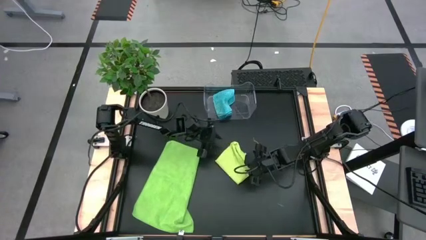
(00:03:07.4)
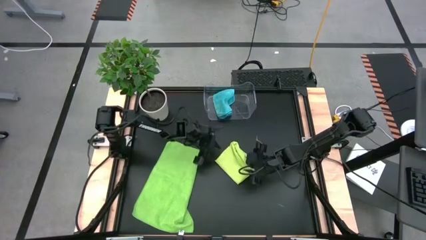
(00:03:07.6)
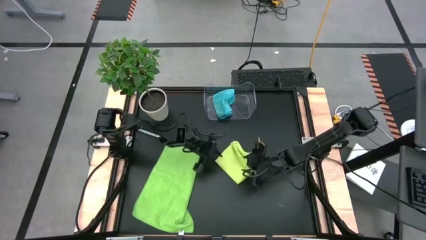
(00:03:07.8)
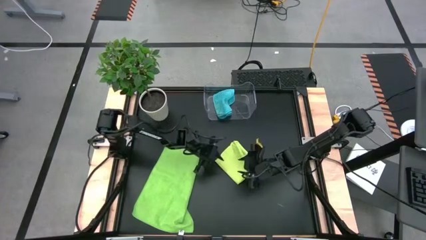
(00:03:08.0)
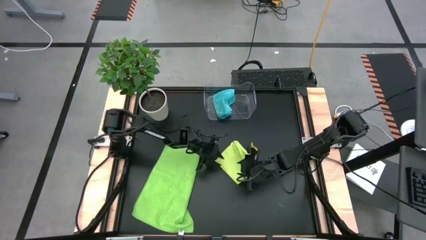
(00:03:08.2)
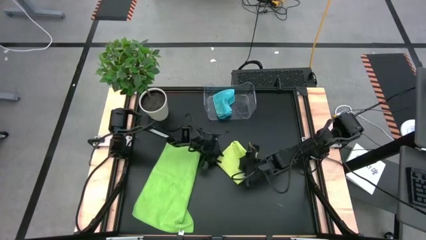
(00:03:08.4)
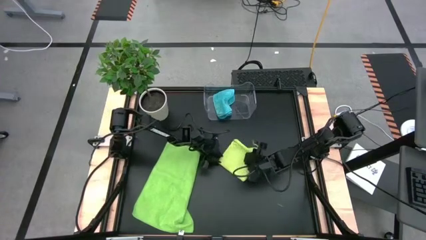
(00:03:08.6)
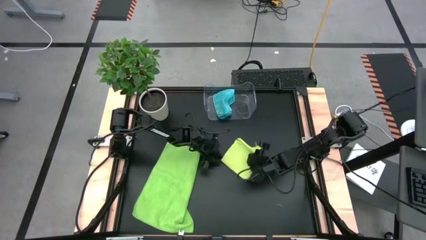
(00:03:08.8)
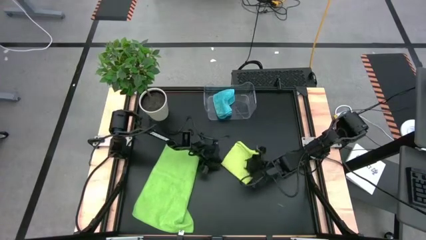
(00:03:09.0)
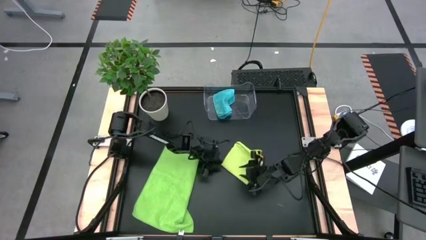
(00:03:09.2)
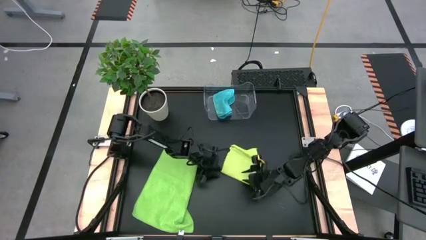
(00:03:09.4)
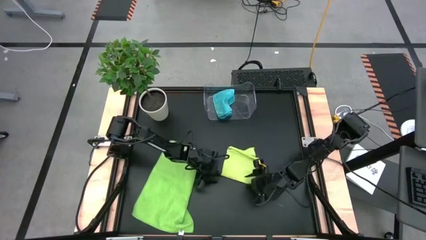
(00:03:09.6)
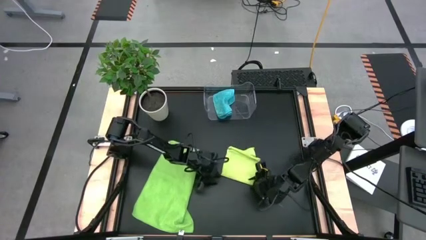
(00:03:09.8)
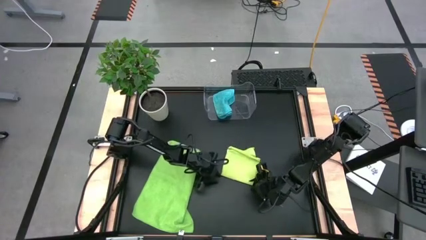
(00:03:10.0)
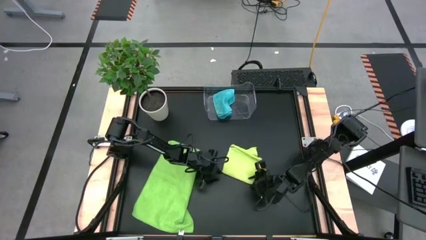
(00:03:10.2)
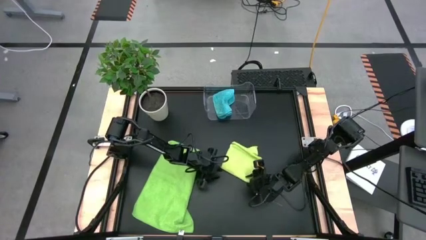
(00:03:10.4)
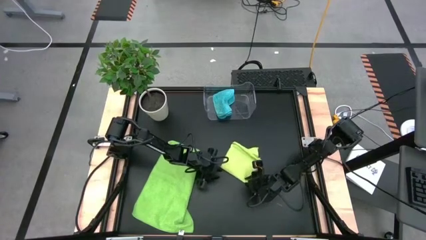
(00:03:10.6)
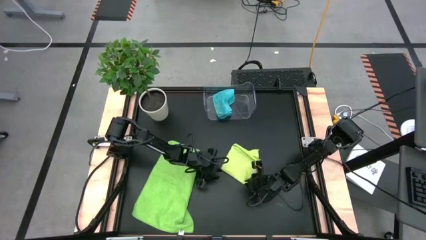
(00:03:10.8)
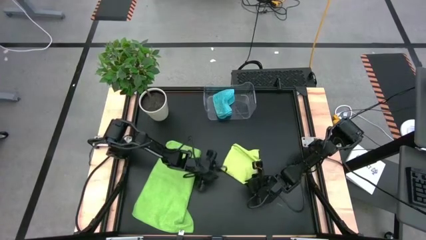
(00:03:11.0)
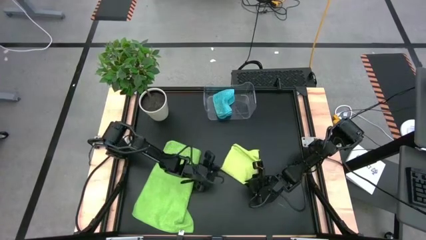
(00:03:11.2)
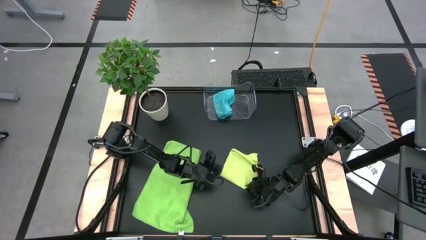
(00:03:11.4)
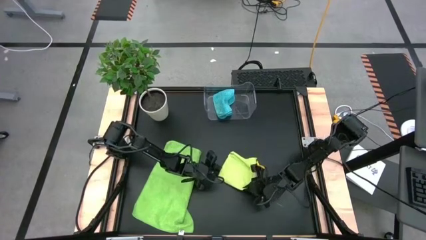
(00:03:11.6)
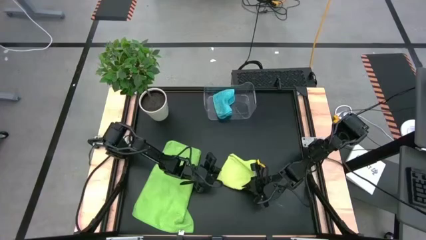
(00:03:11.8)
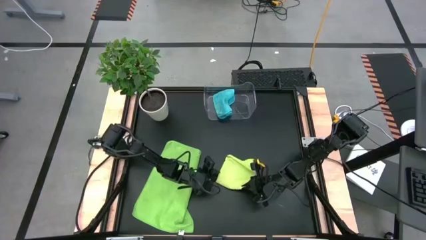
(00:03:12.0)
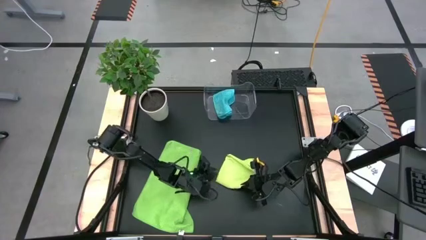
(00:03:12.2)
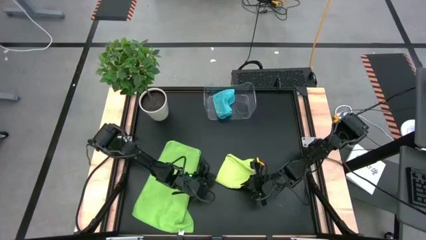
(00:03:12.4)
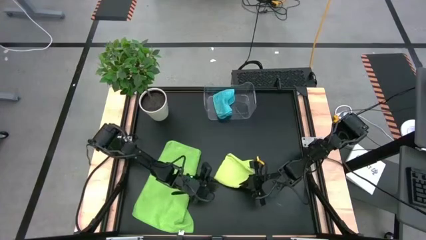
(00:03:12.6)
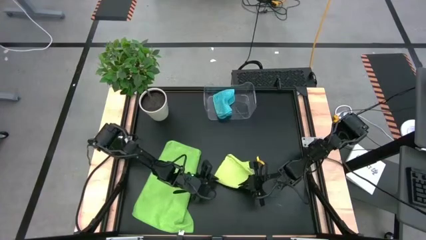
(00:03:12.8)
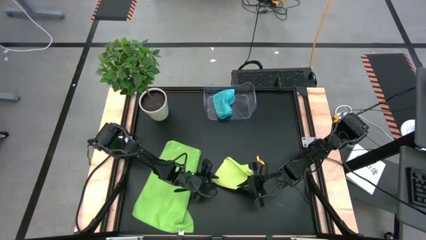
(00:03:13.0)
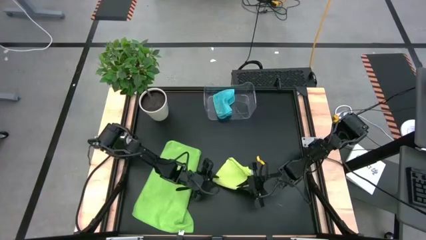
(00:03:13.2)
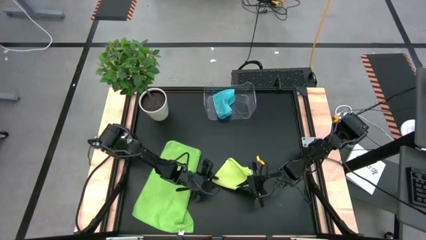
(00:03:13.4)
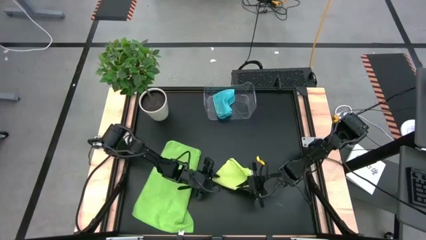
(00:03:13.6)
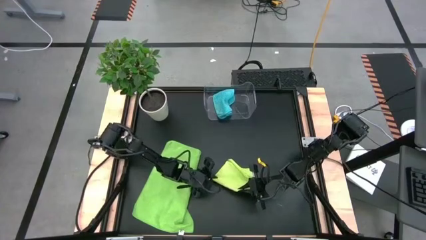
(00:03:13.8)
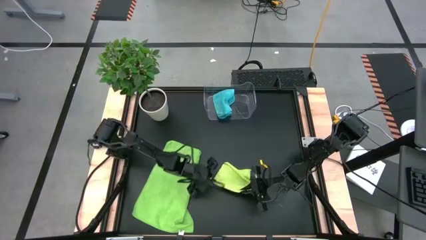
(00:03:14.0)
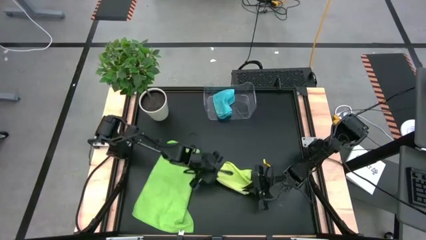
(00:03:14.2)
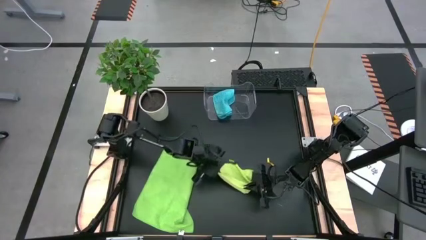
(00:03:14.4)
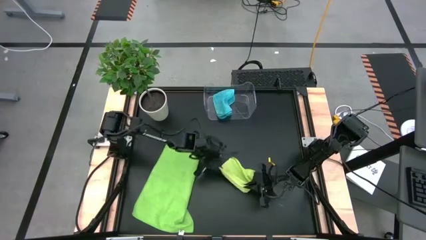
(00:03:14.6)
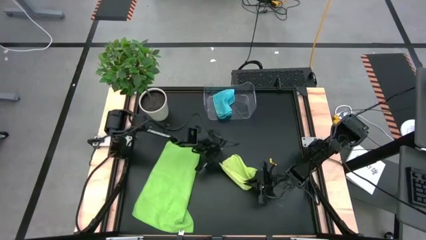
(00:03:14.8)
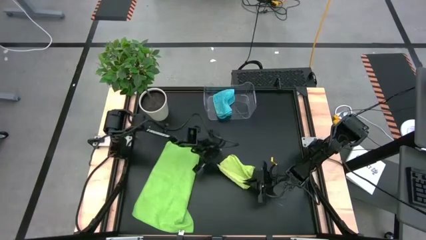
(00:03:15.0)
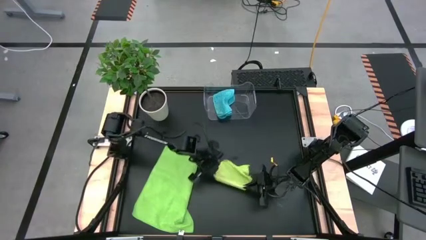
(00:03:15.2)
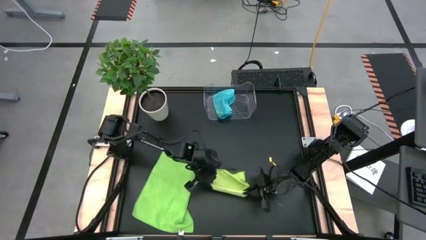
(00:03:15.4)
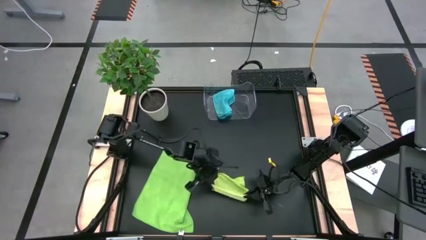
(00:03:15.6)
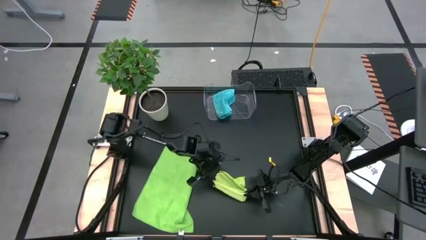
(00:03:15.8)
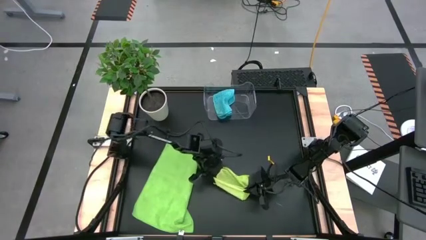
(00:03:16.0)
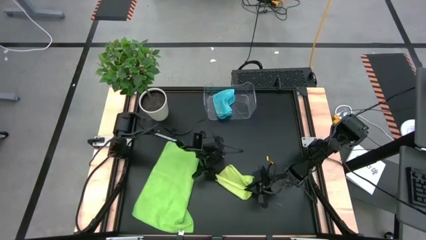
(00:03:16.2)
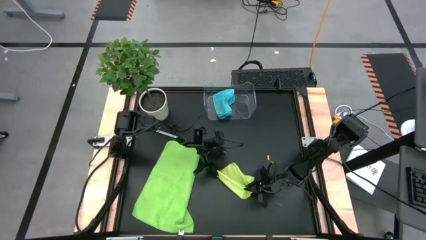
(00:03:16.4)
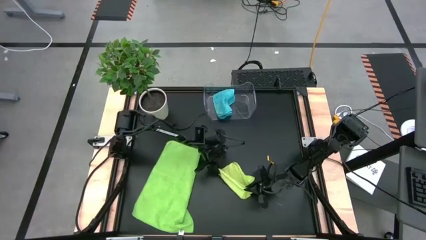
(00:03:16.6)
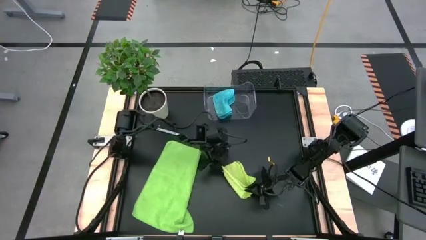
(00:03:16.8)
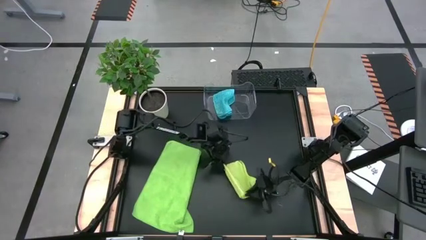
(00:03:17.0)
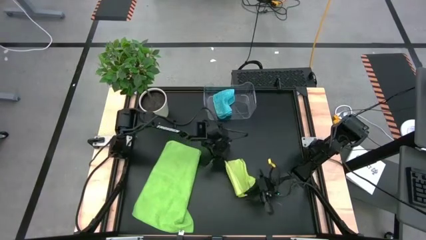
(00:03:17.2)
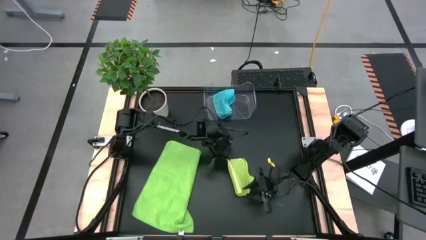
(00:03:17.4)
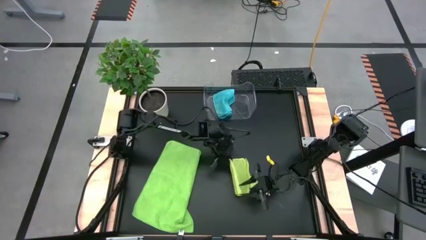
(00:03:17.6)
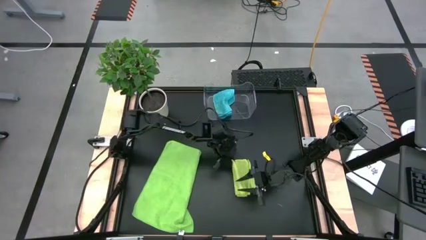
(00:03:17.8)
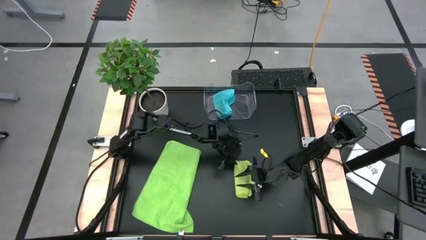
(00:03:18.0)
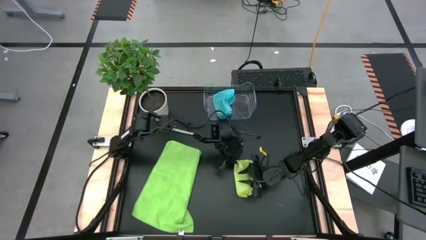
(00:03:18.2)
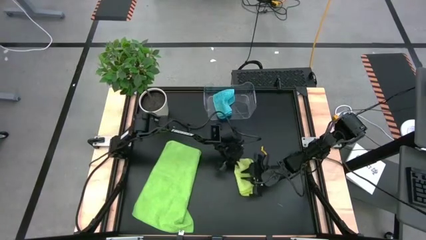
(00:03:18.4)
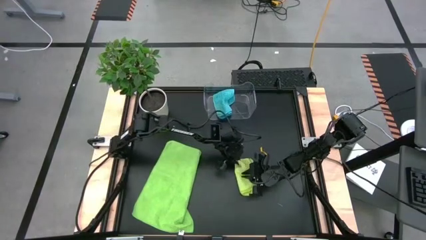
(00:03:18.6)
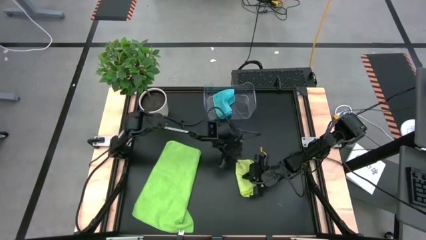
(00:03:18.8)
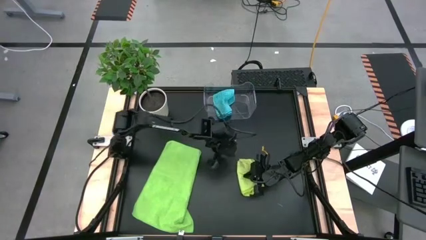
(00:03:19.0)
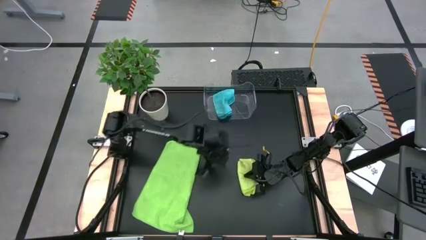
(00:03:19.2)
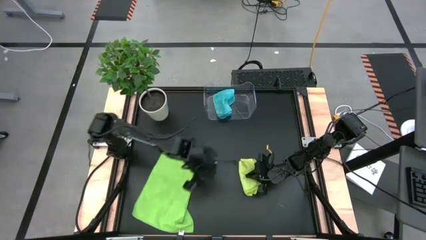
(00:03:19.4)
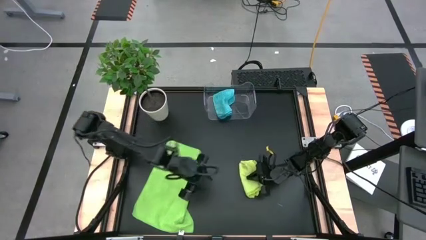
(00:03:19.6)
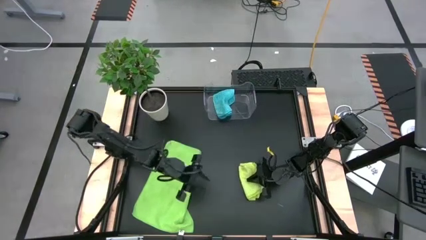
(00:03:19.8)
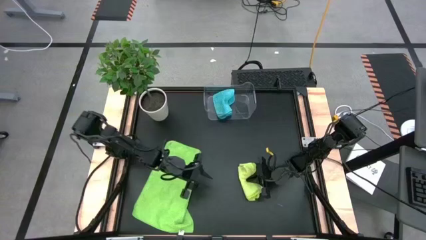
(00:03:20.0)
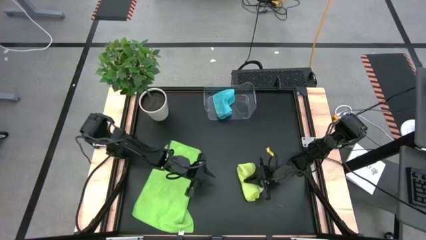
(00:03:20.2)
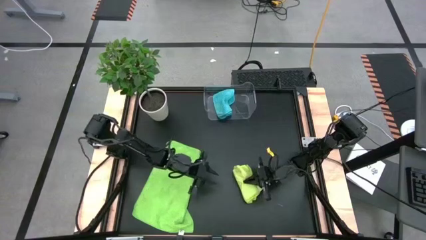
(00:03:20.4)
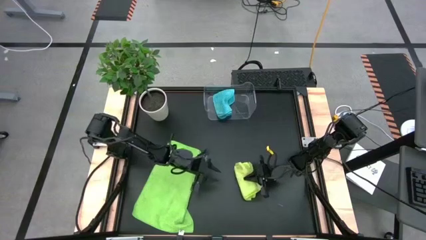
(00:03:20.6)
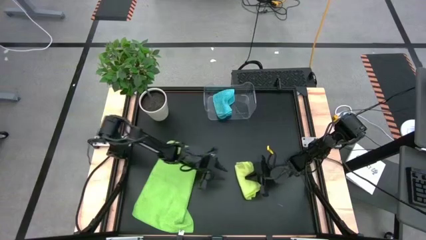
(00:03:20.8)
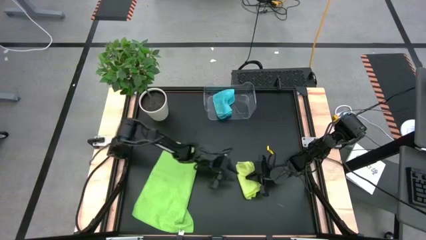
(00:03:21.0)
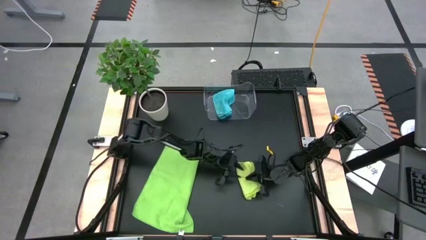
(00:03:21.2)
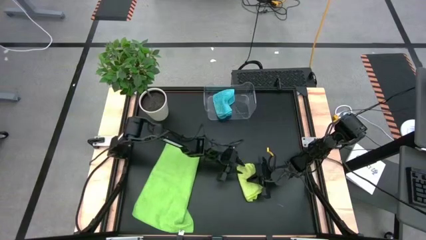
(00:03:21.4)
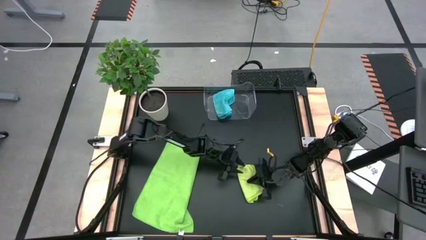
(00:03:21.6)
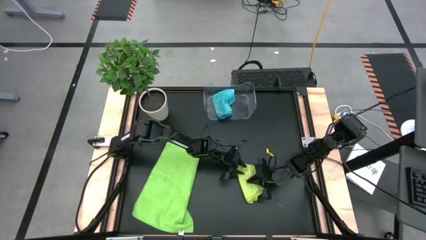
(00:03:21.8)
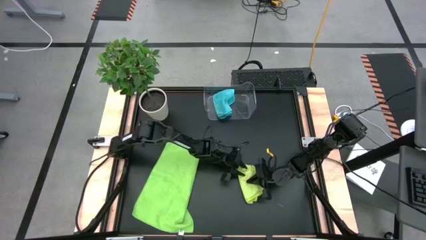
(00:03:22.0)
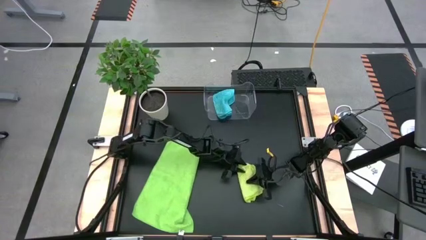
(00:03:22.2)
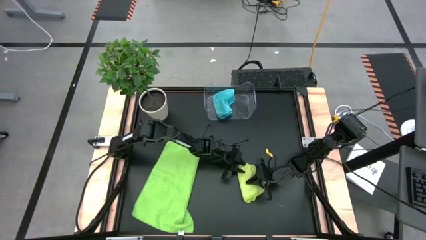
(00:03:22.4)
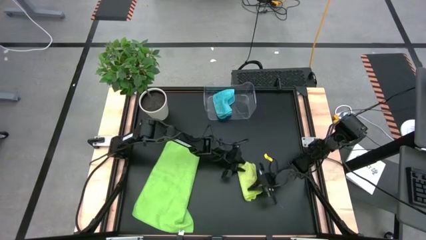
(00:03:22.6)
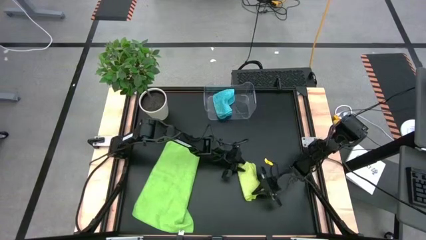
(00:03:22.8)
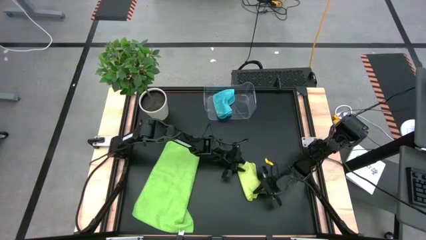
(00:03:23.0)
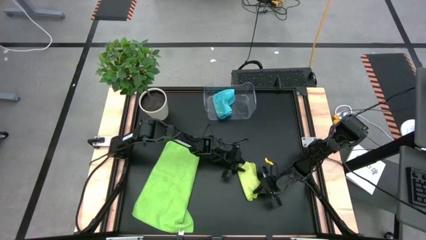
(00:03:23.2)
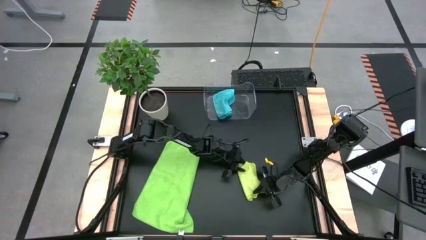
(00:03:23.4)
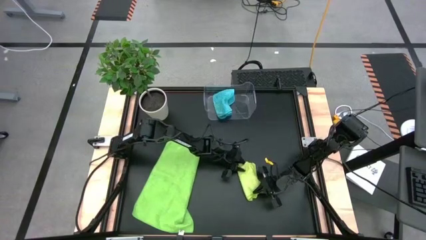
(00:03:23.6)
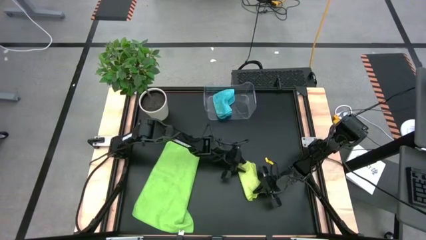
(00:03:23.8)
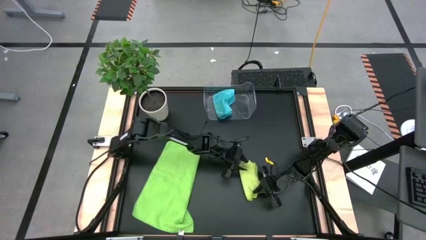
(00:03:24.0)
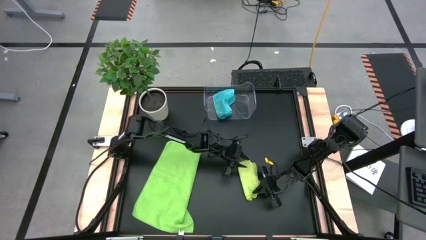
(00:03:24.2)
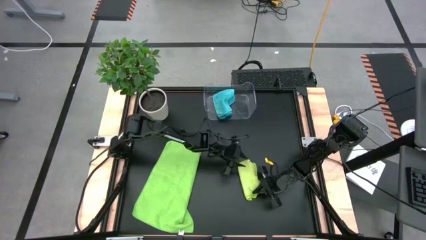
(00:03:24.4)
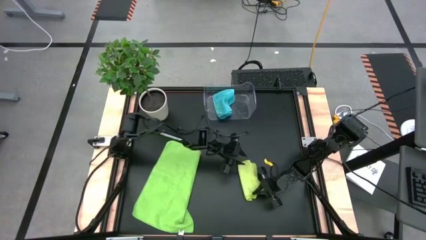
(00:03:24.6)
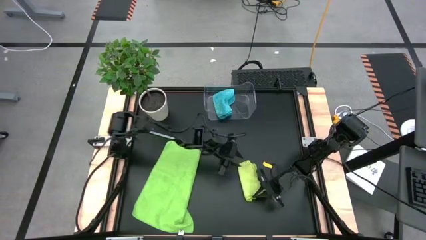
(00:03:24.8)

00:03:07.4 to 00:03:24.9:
Task: Fold microfiber towels
Fold the light green microfiber cloth
